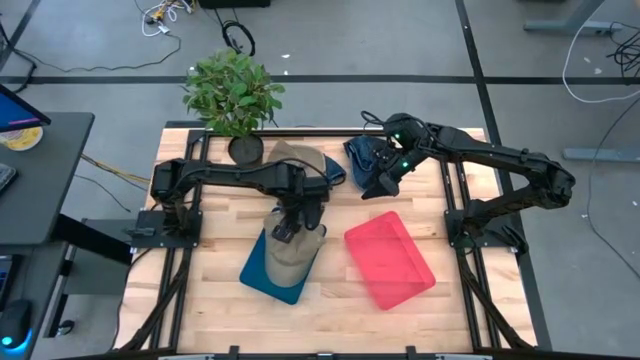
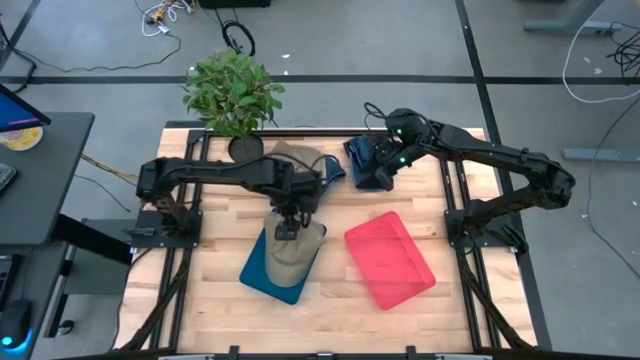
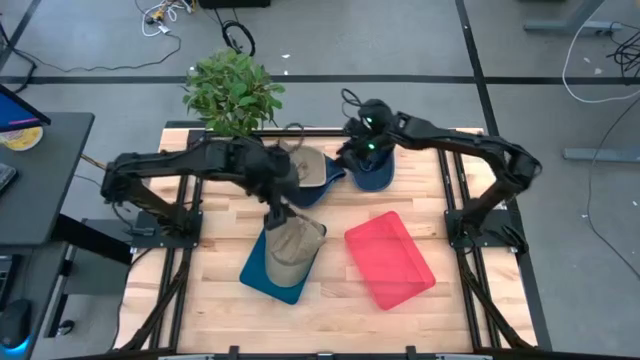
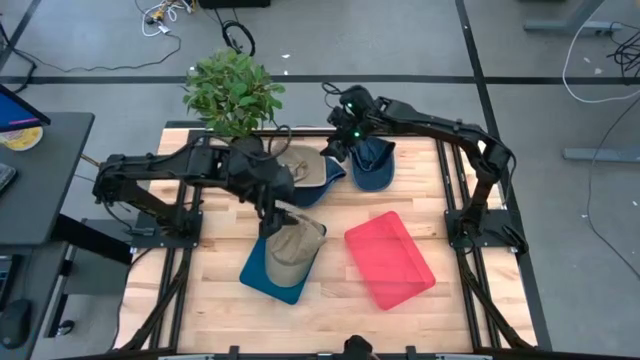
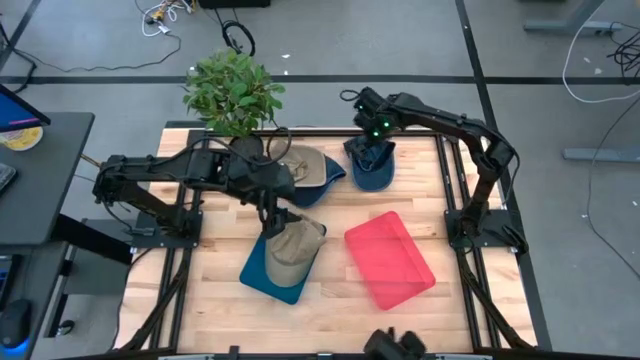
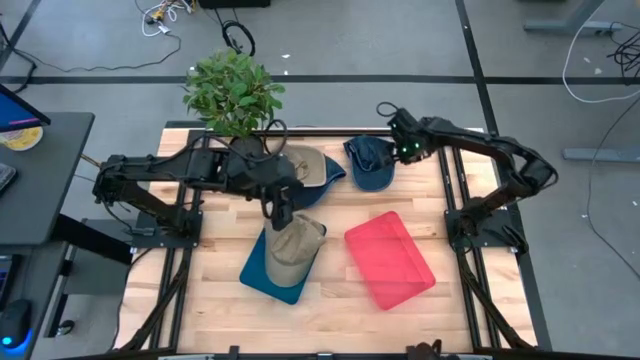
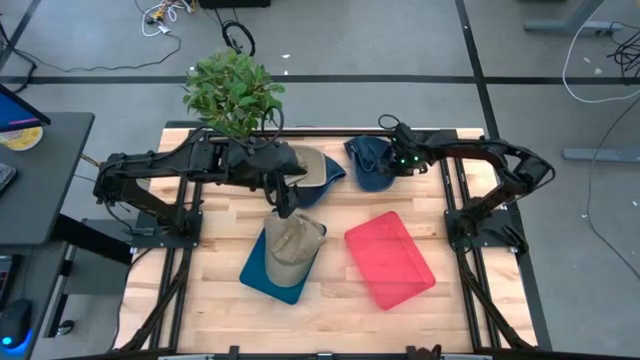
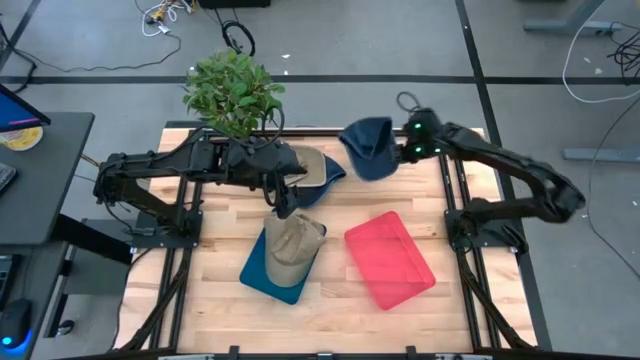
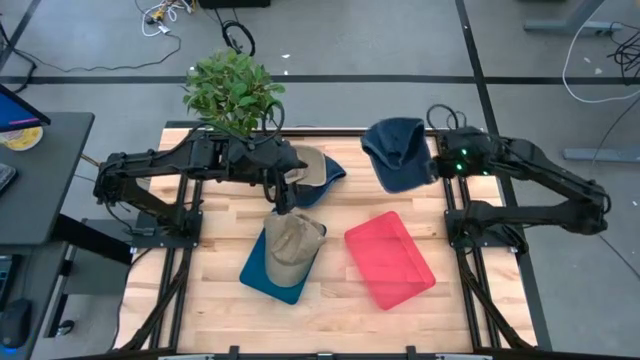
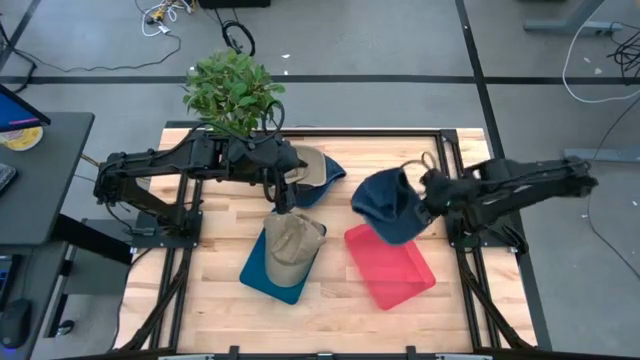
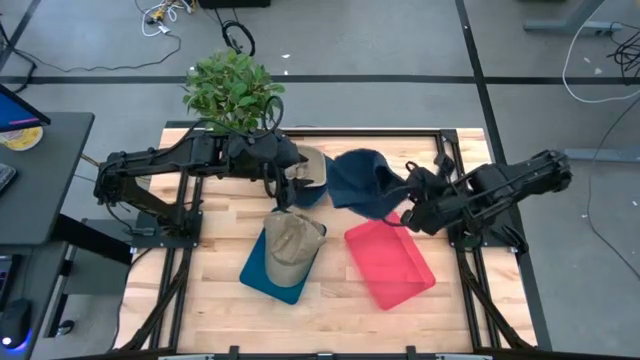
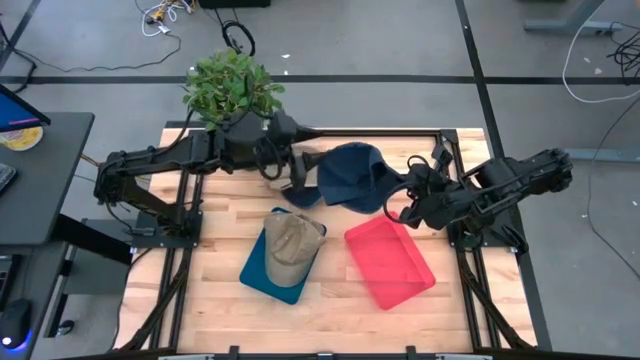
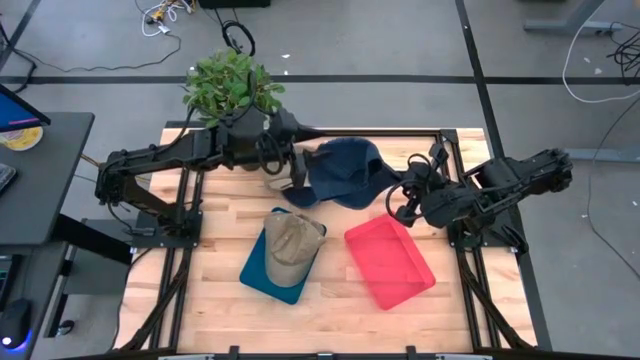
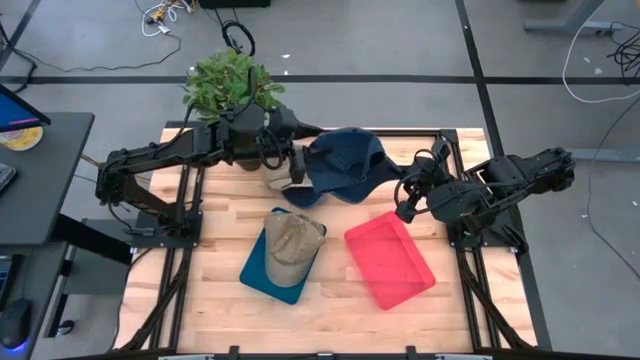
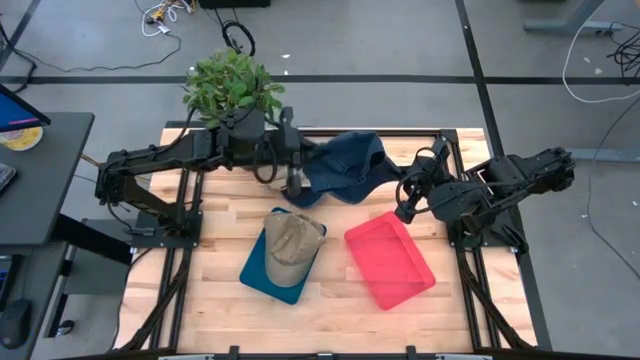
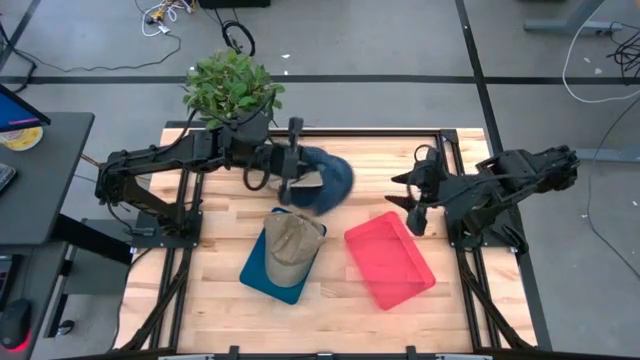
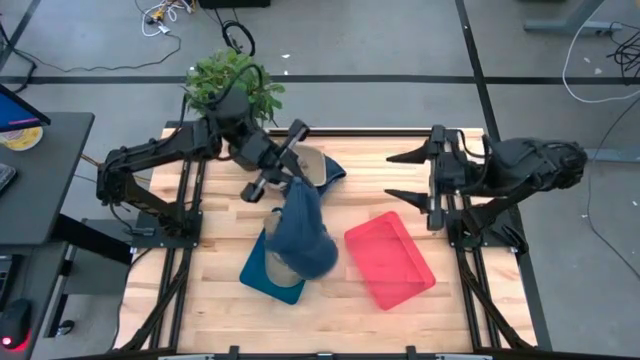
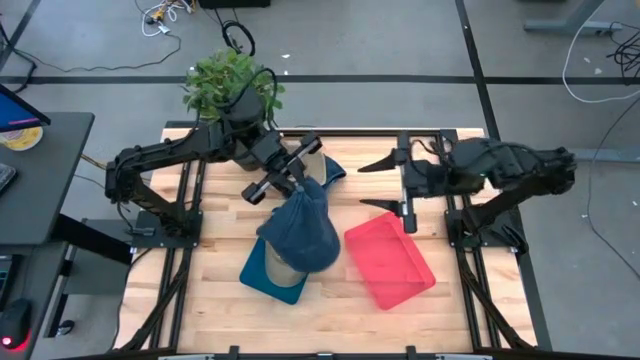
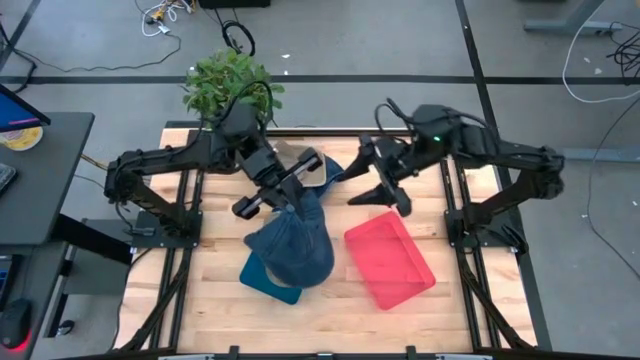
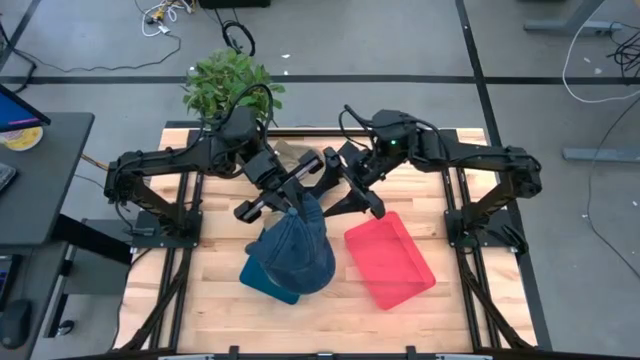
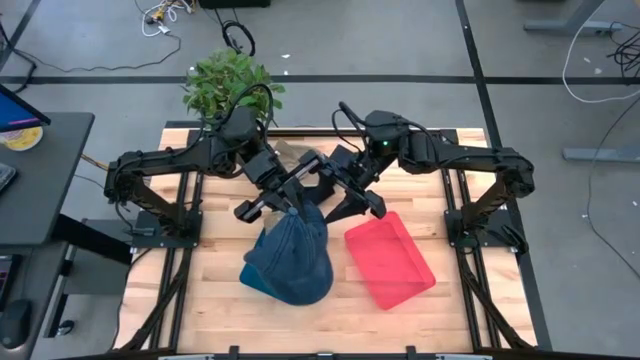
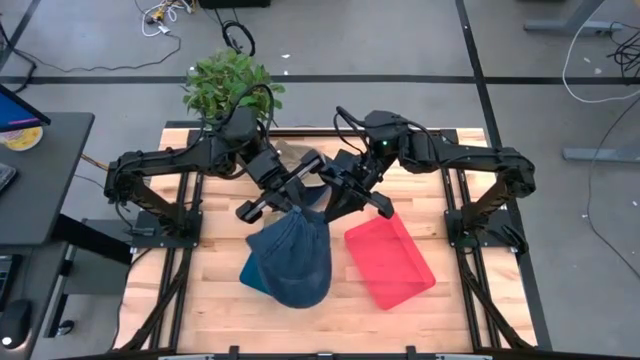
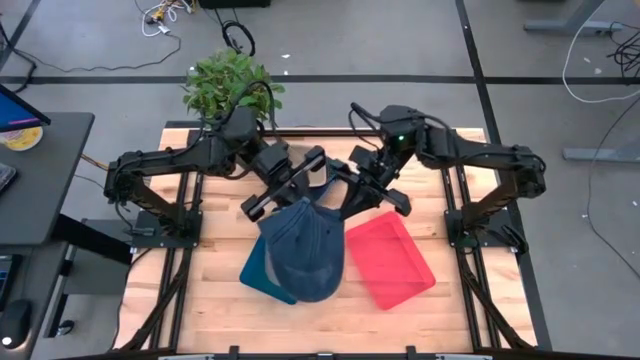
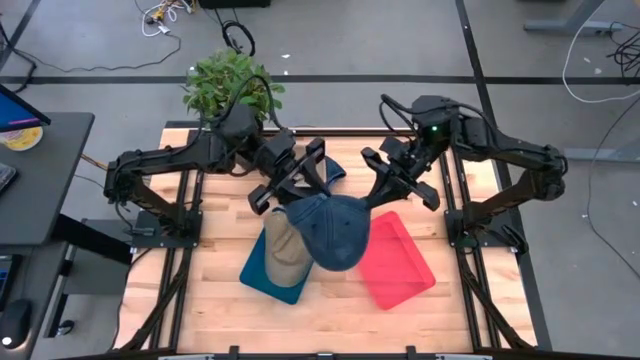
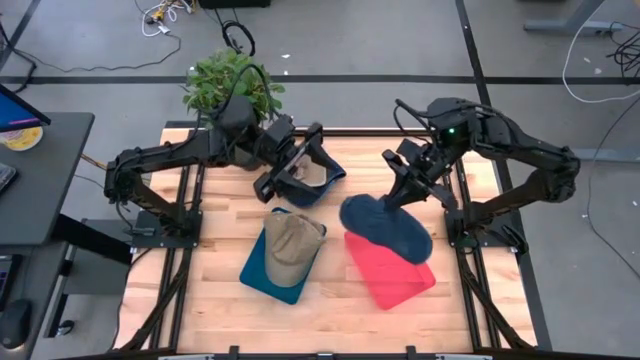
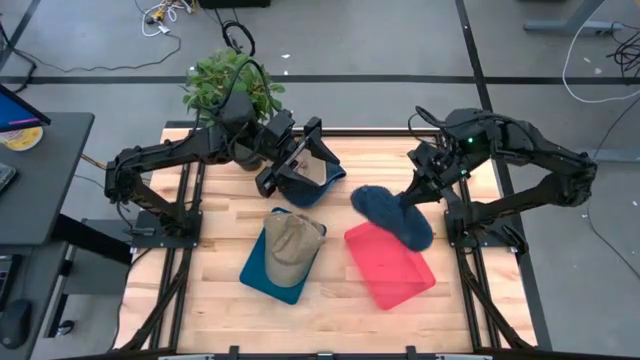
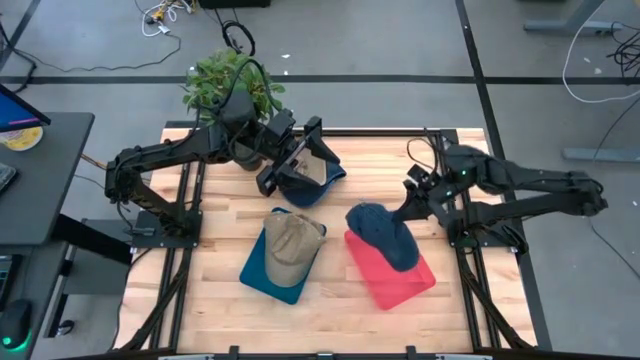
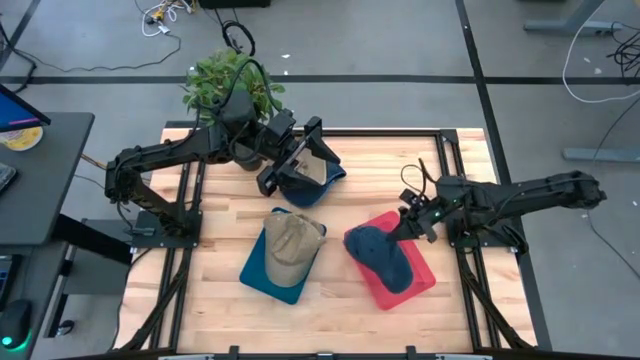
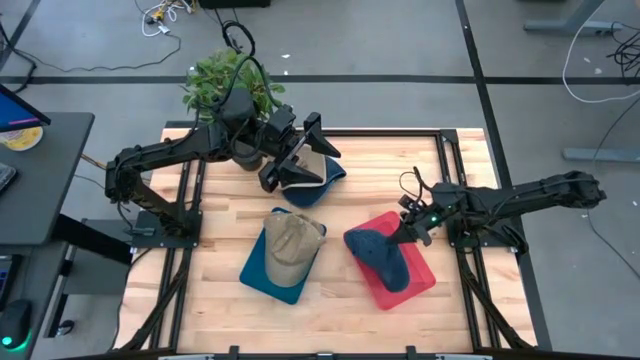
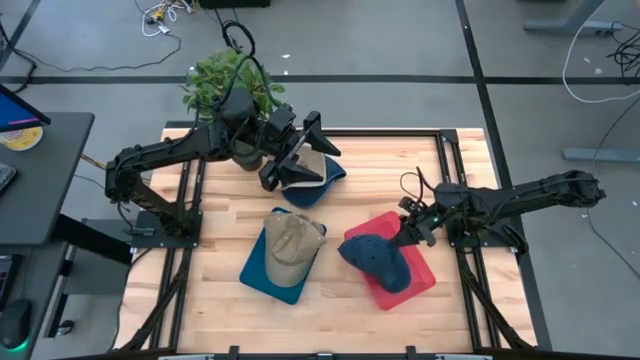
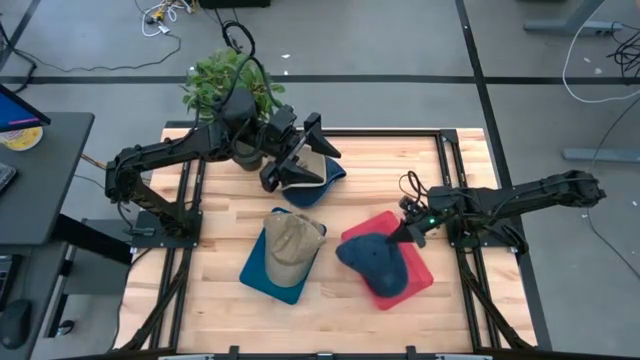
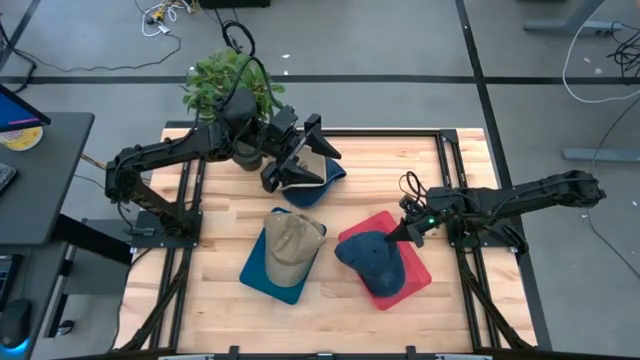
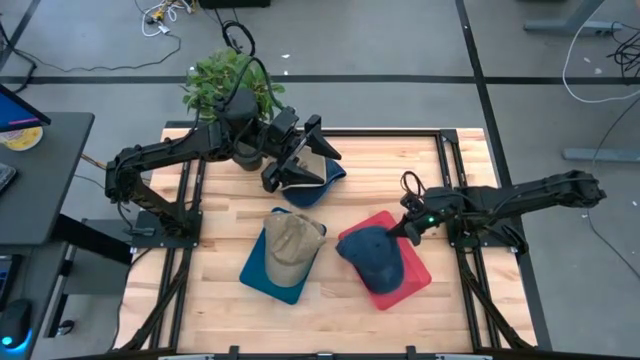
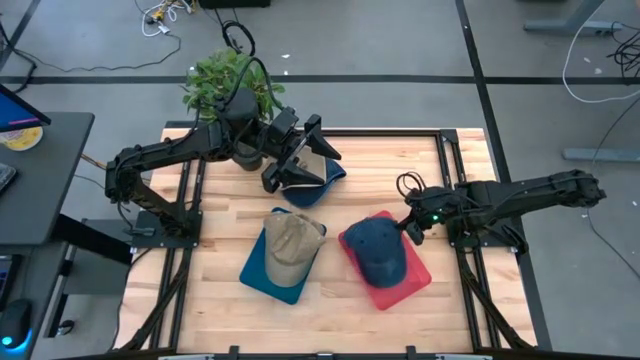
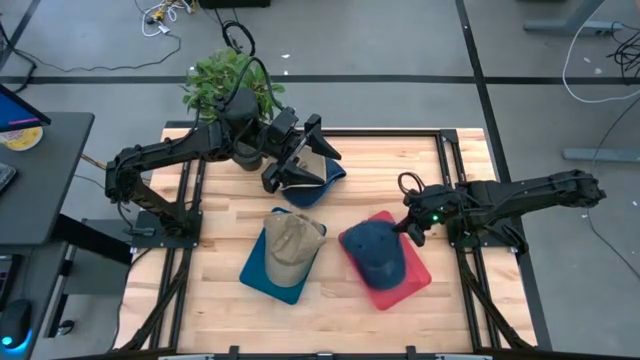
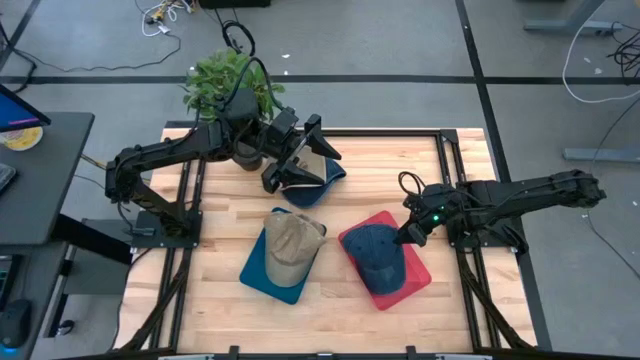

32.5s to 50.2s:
Task: Pick & Place hat
Put the blue cap into the pink bin

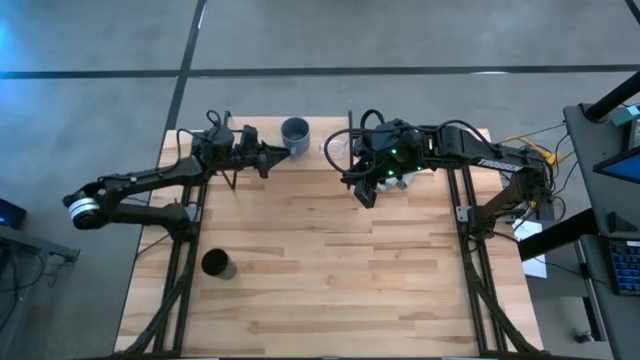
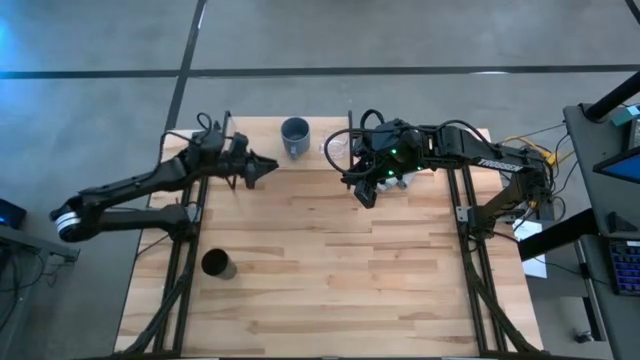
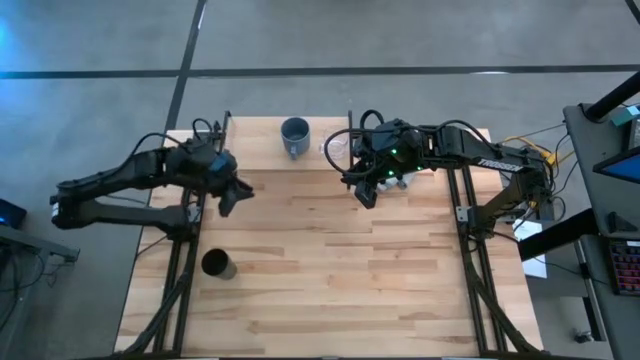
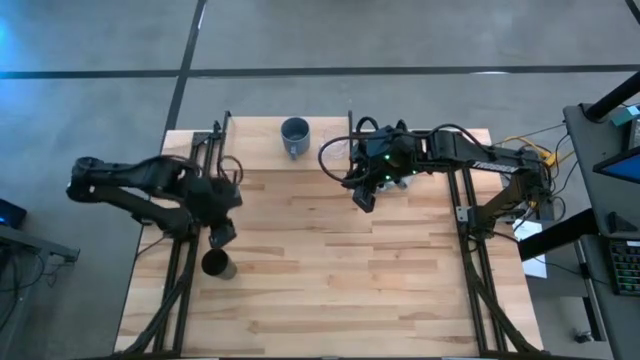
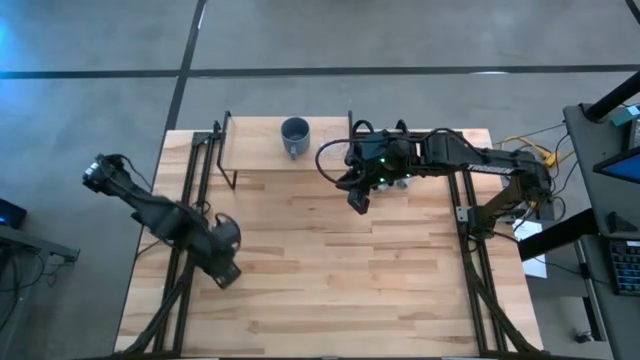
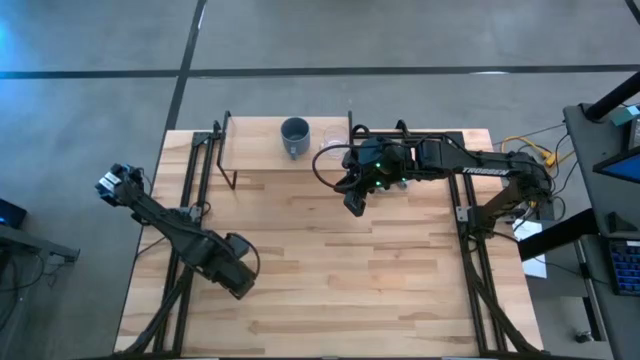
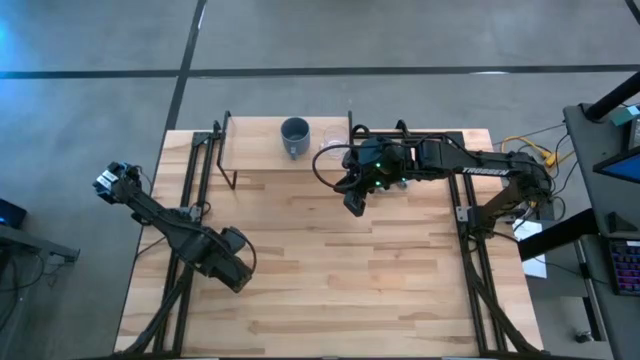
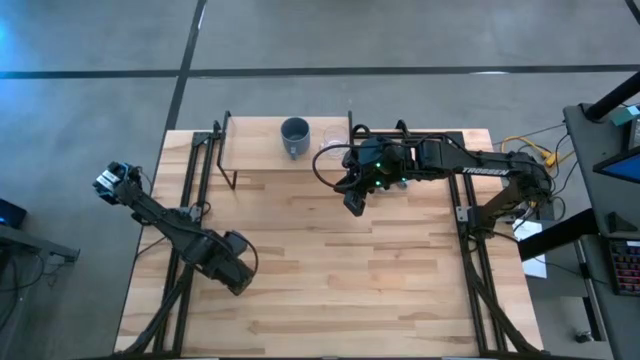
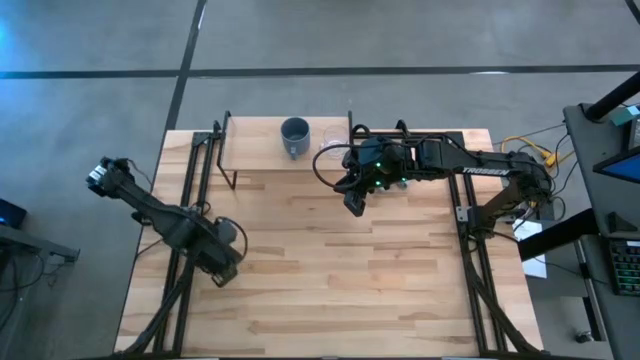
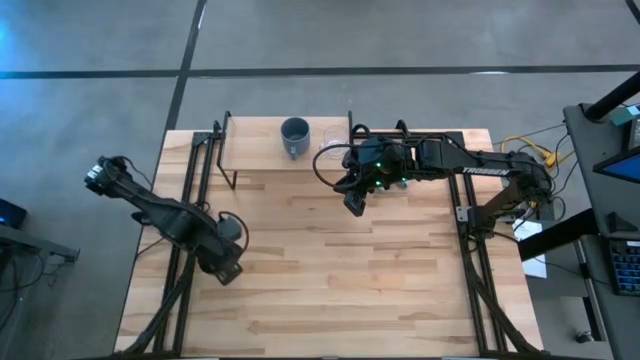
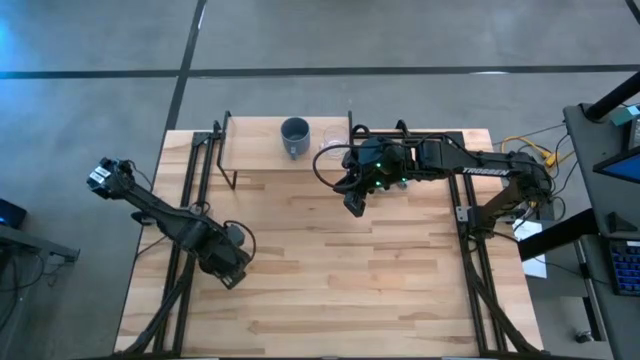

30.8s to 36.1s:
Task: Stack small to large cups/mugs on shelf
Put the black cup on the shelf
